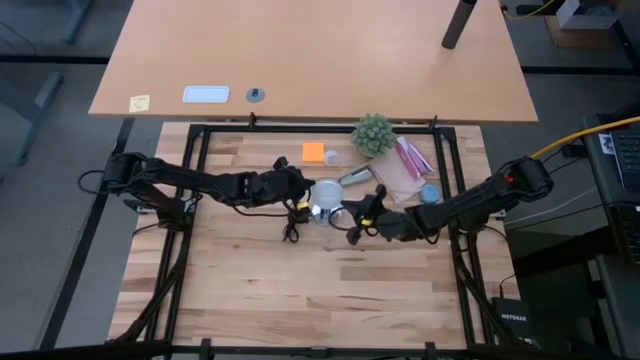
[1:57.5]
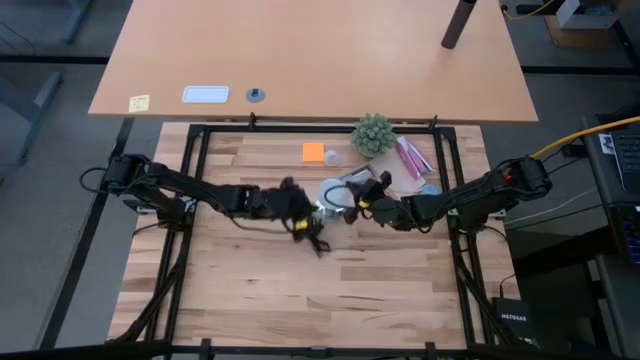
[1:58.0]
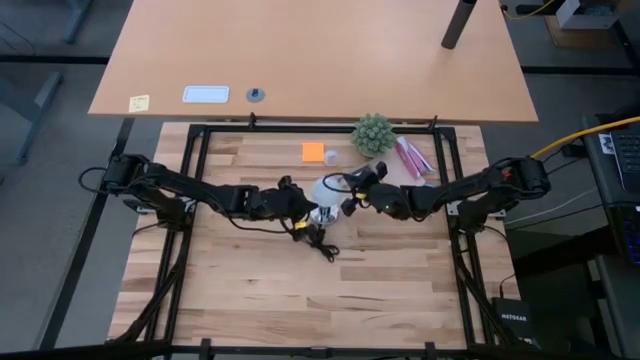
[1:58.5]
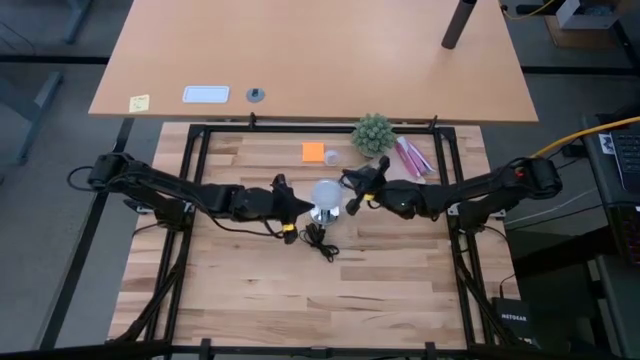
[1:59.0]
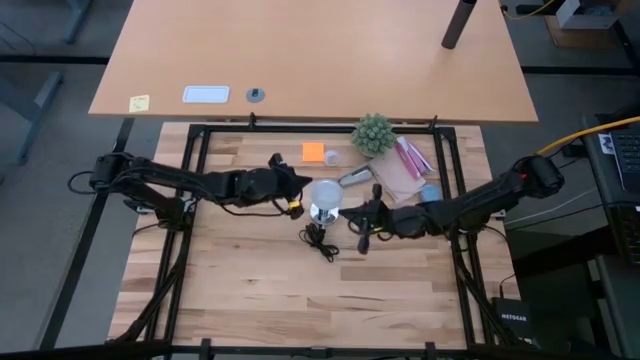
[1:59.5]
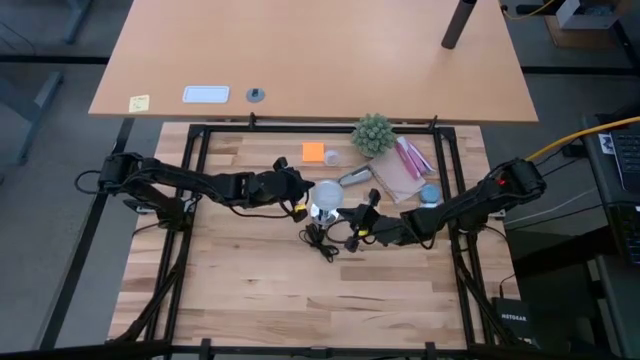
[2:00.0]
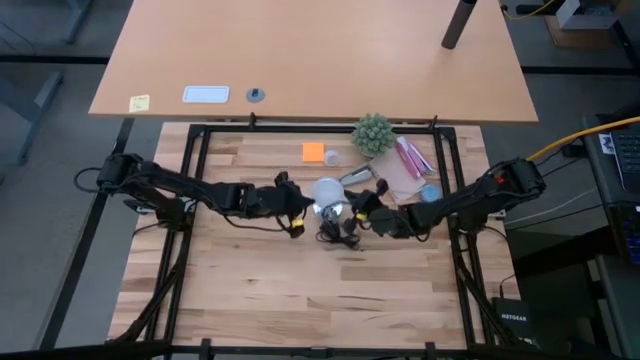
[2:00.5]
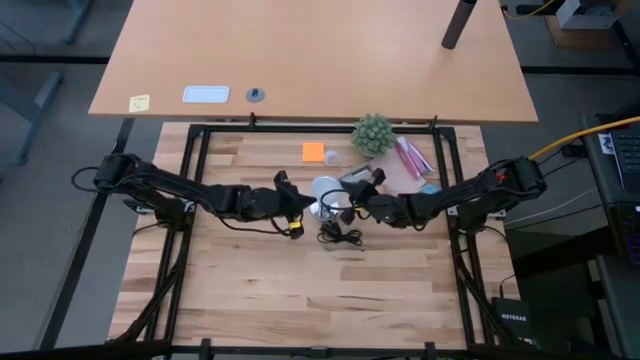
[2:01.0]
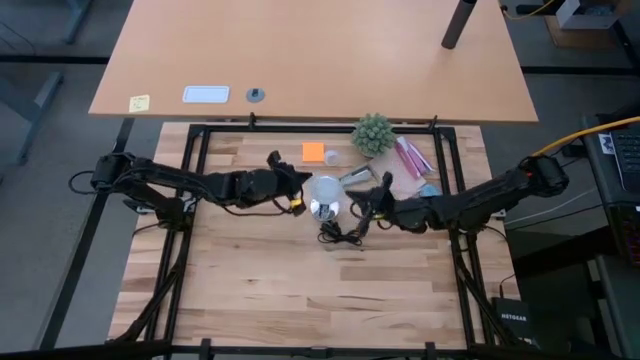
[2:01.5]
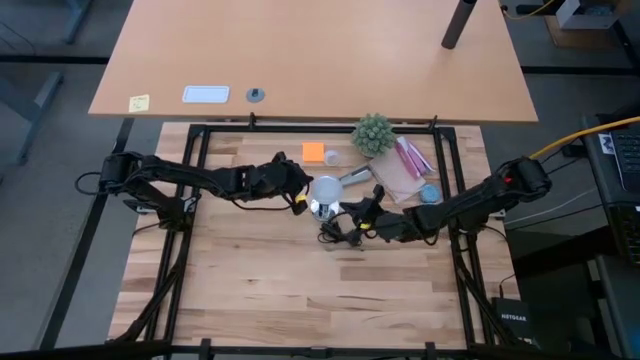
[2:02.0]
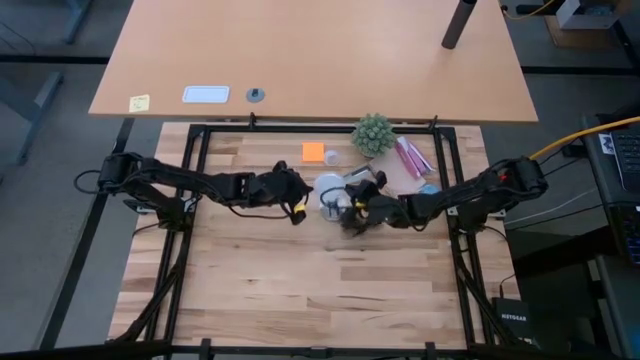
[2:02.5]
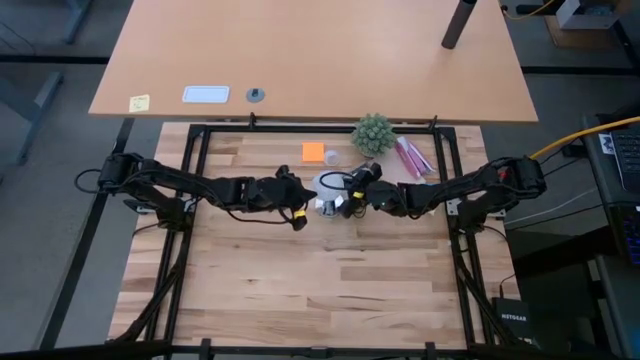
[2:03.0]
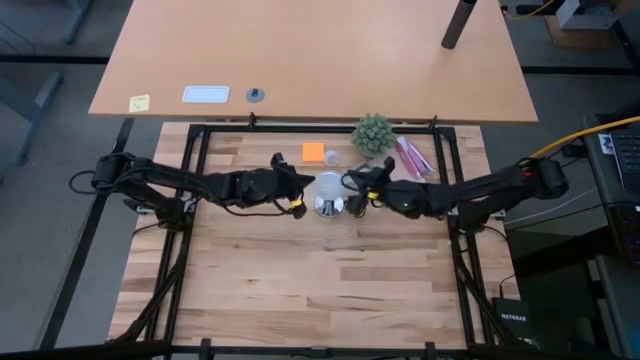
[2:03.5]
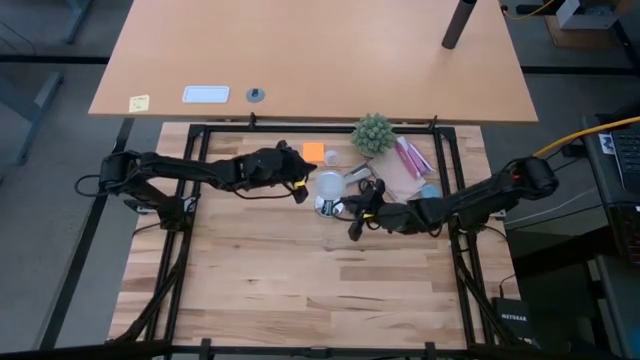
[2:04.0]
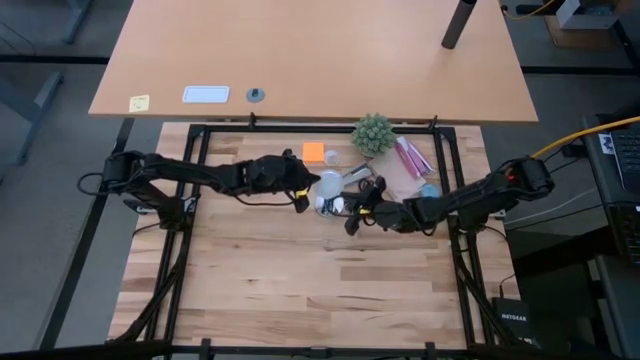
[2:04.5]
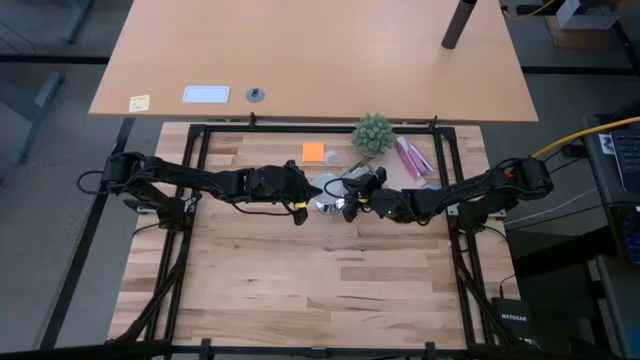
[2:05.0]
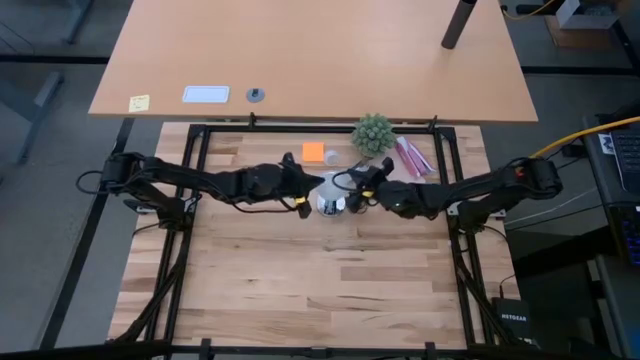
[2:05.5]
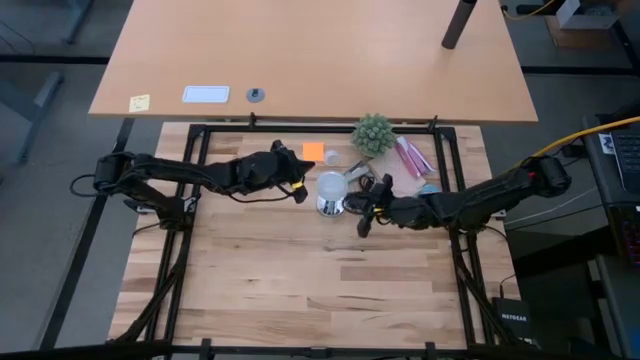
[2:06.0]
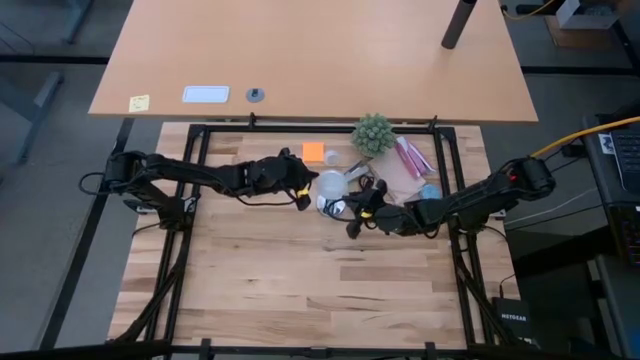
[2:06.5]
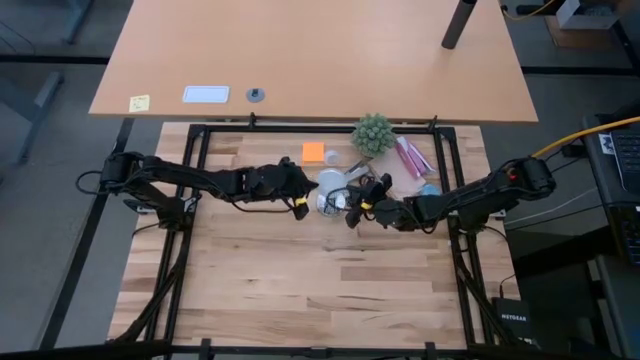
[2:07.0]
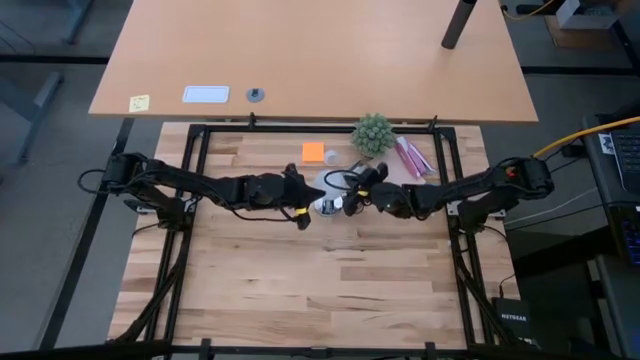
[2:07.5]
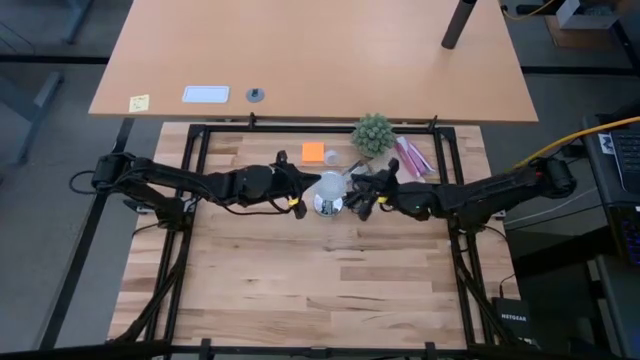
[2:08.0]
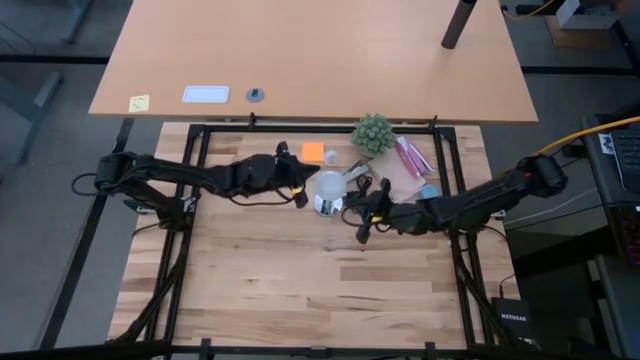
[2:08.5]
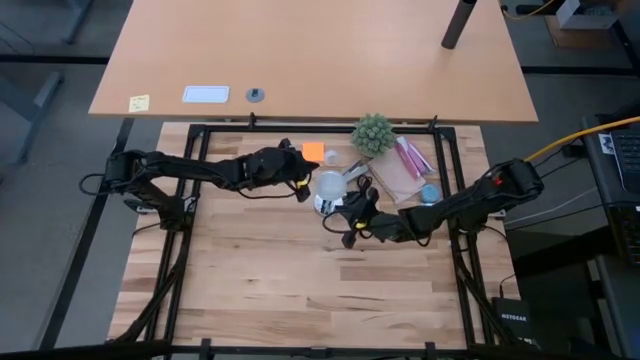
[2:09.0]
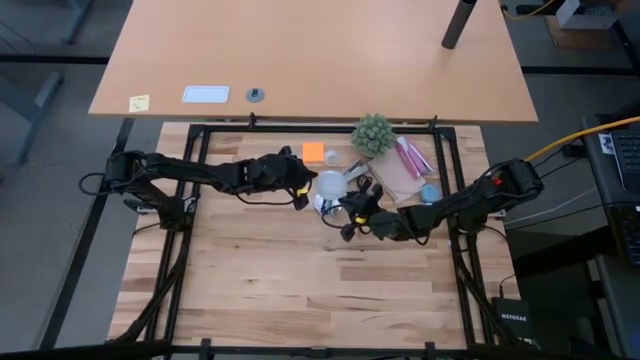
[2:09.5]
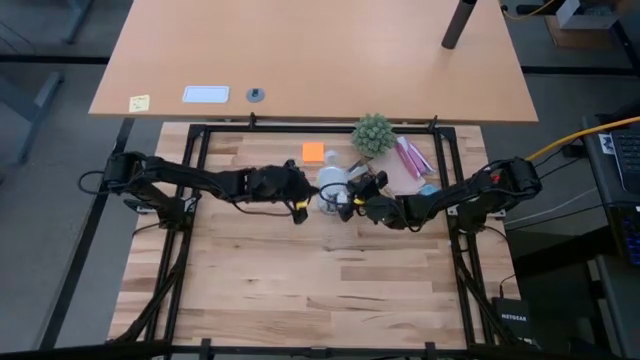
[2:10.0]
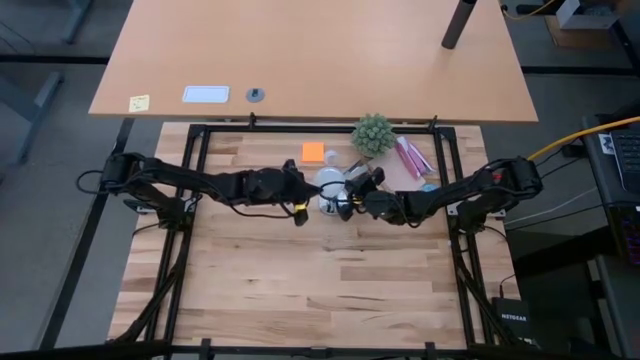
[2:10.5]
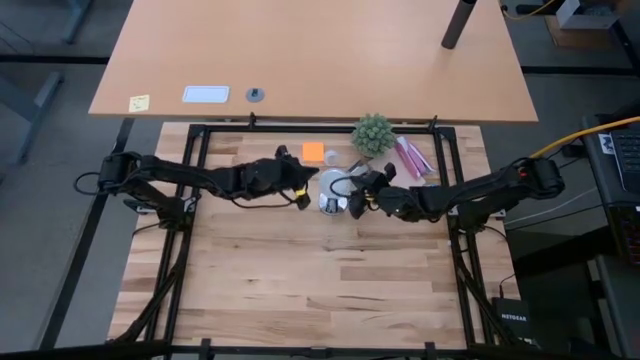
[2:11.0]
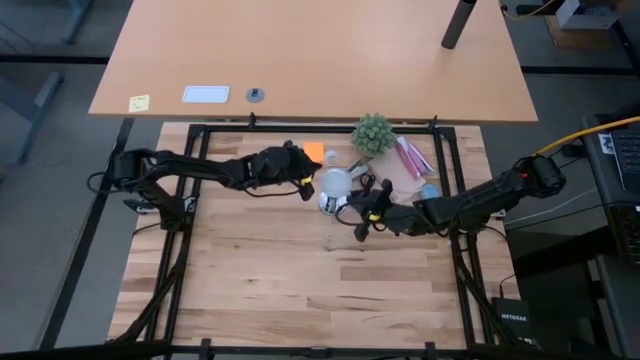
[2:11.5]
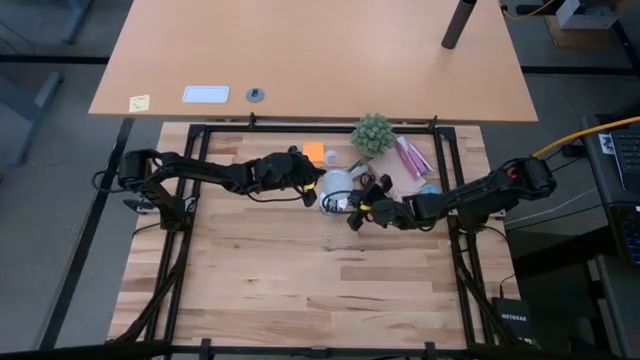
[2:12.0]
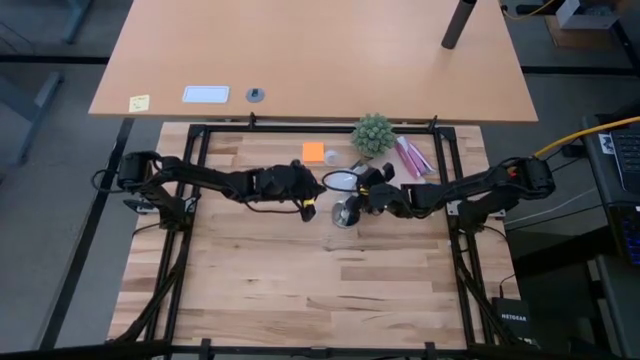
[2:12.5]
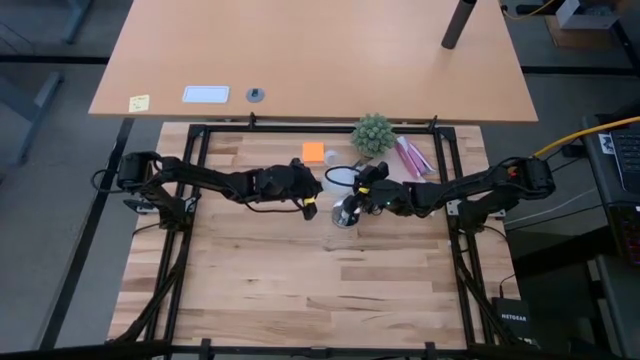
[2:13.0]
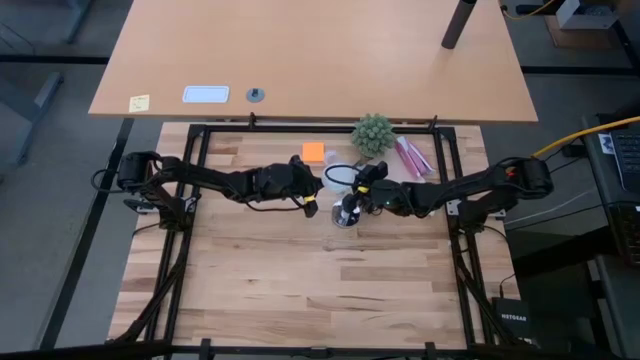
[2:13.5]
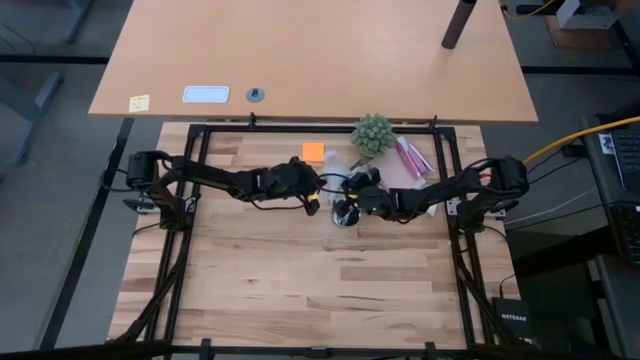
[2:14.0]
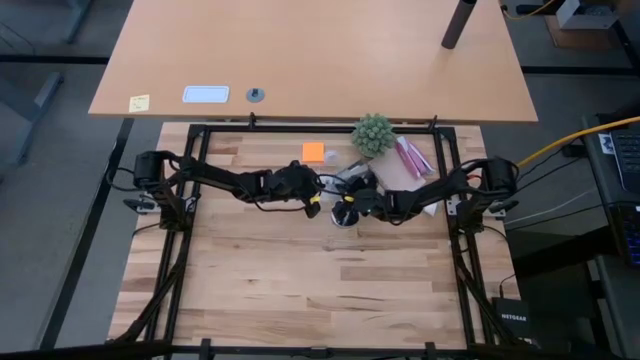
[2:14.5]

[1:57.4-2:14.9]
Task: Screw lightbulb
Remove the lightbulb from the silver lamp

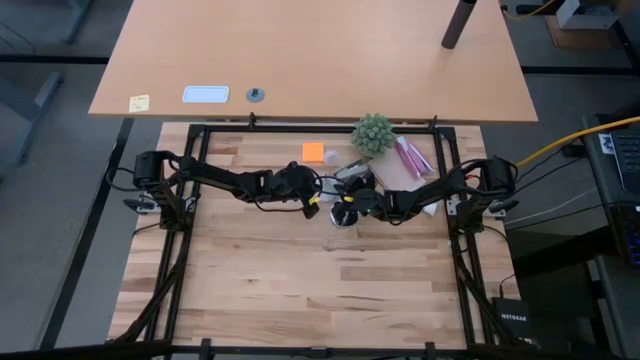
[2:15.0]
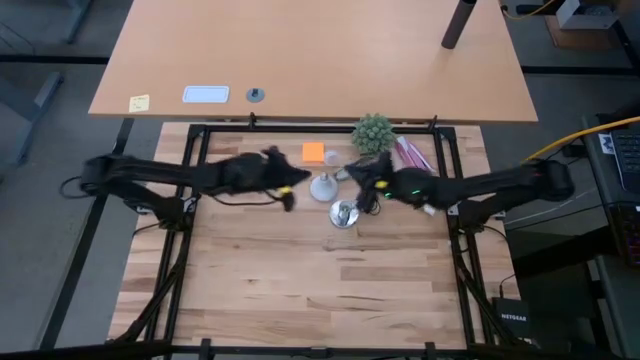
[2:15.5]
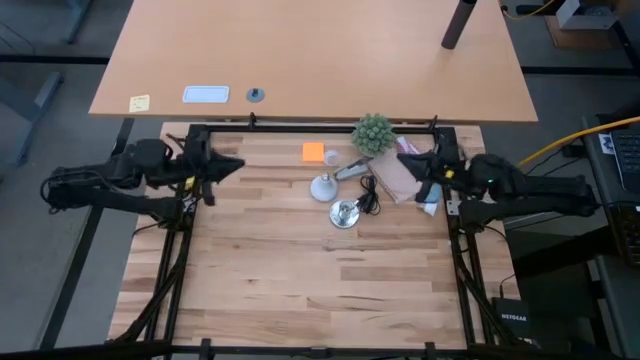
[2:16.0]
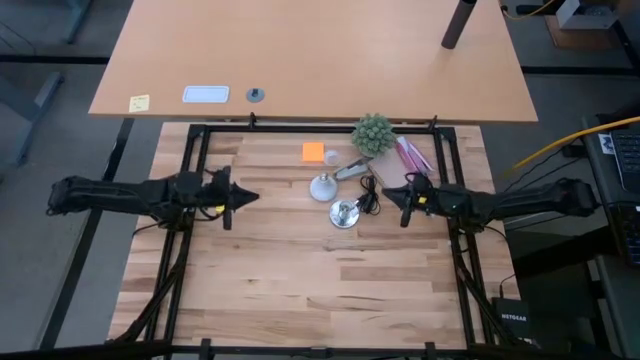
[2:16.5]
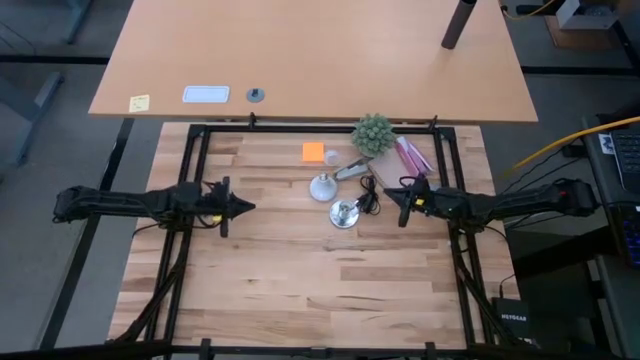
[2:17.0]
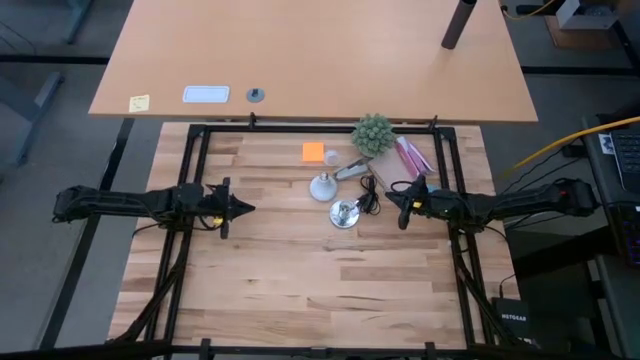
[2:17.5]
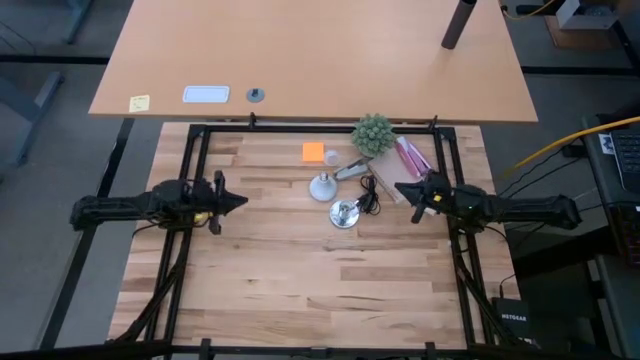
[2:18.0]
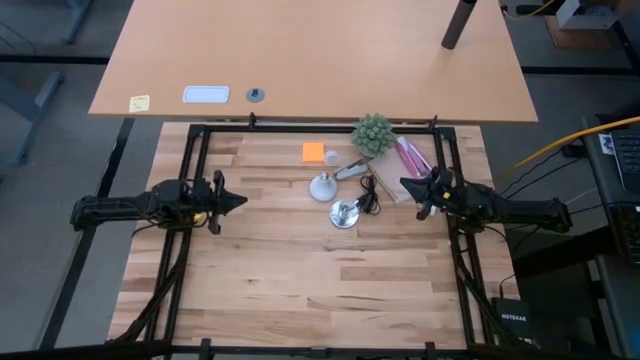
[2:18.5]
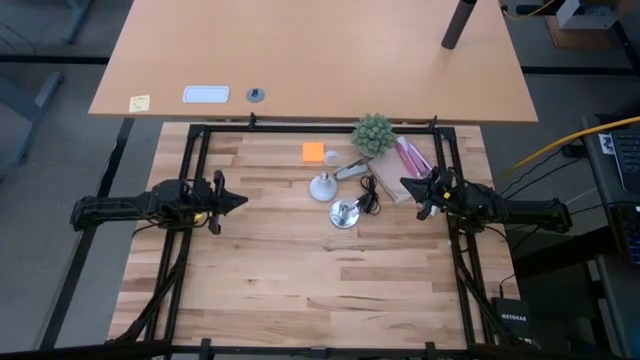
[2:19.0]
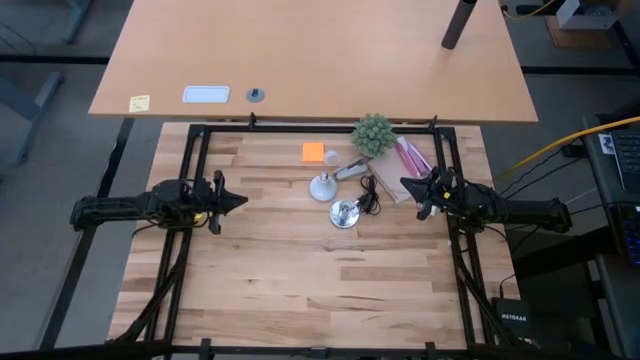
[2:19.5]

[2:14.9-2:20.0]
Return to Home Position
